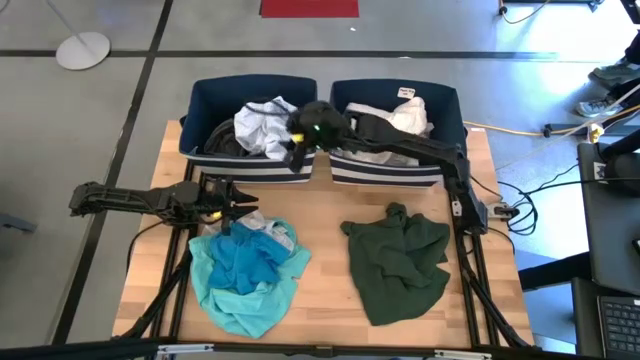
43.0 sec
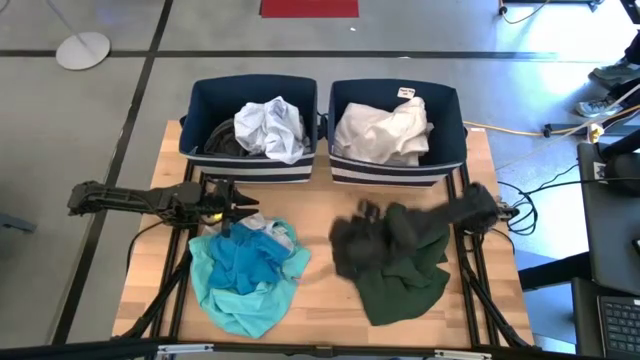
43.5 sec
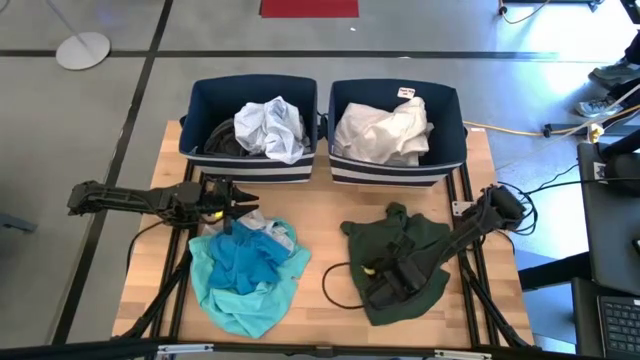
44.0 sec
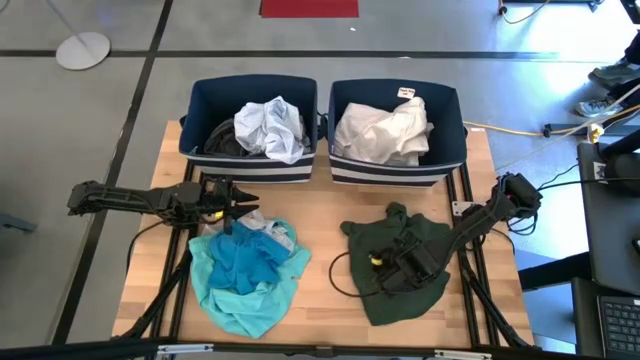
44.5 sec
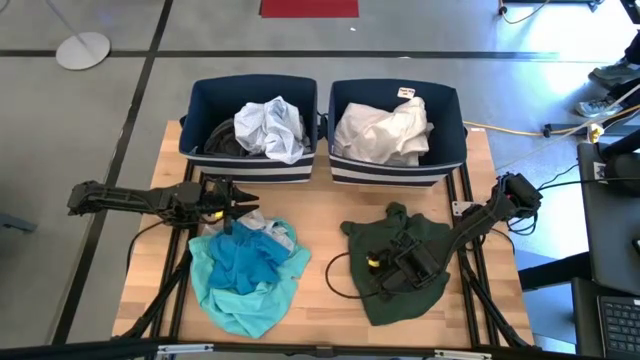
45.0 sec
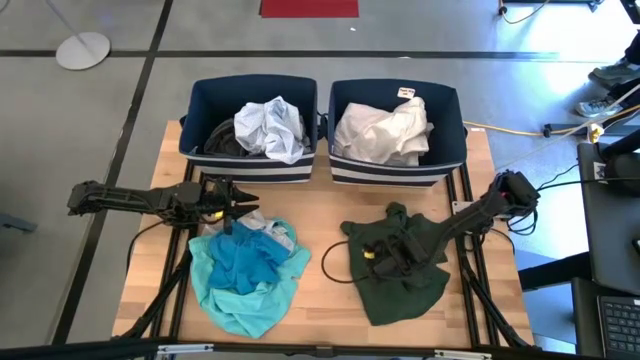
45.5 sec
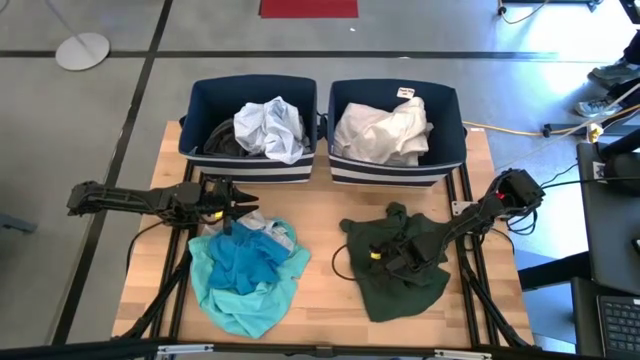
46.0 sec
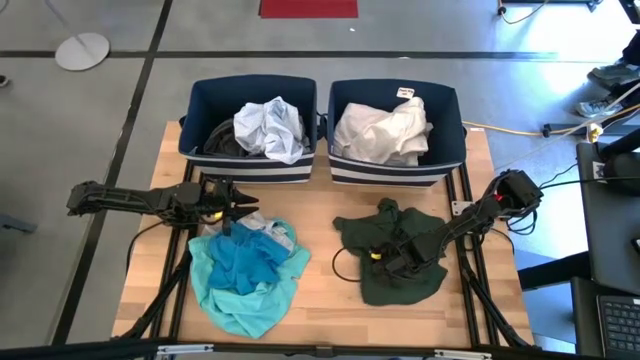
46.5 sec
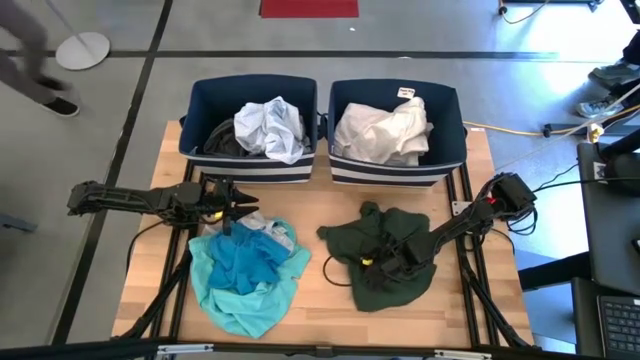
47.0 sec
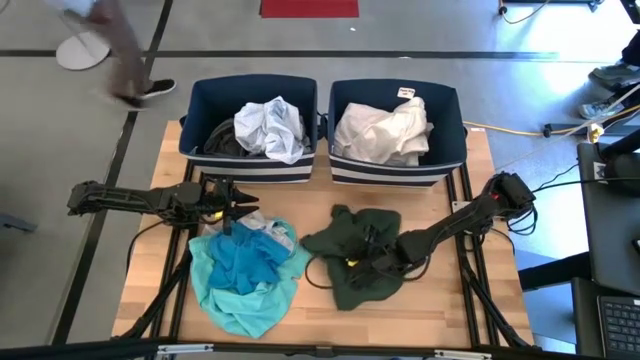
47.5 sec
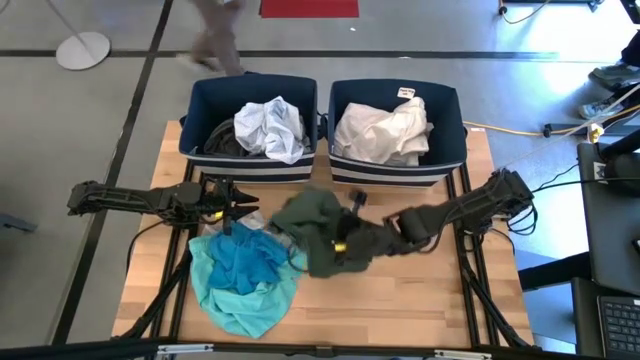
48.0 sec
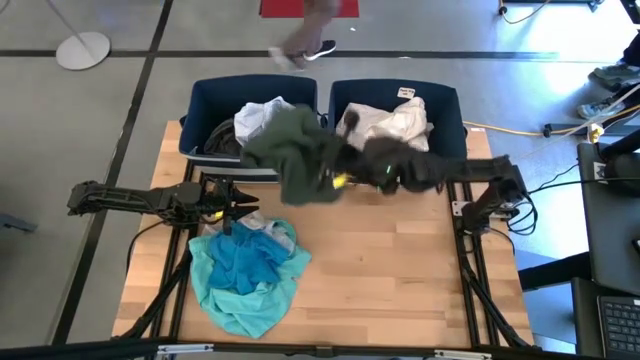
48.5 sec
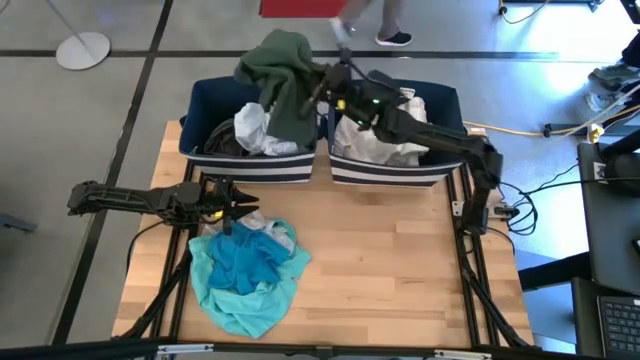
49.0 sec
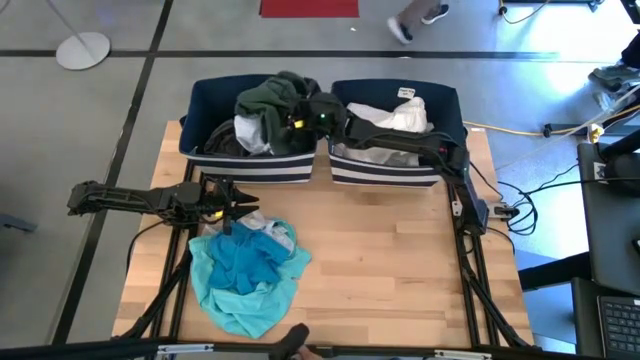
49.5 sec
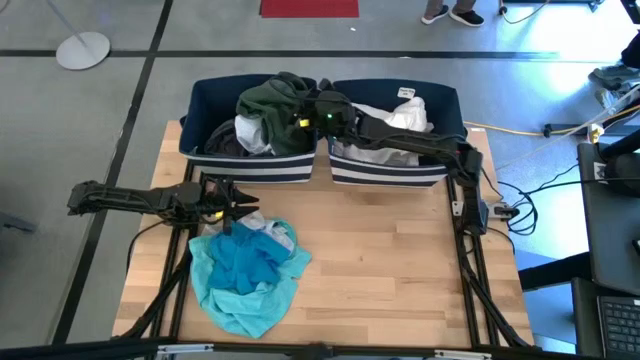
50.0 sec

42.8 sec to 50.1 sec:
Task: Sort clothes
Put the green shirt into the left blue laundry bin

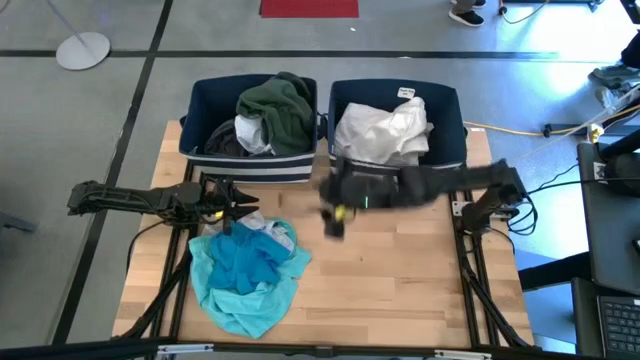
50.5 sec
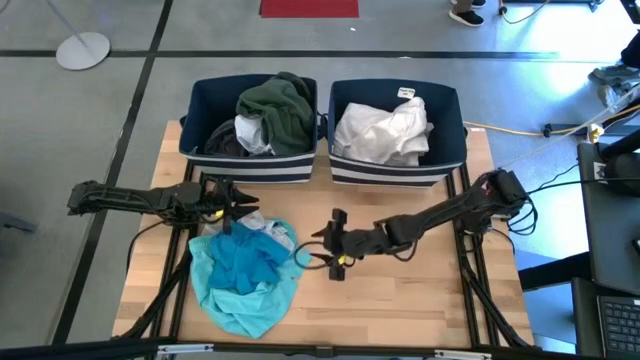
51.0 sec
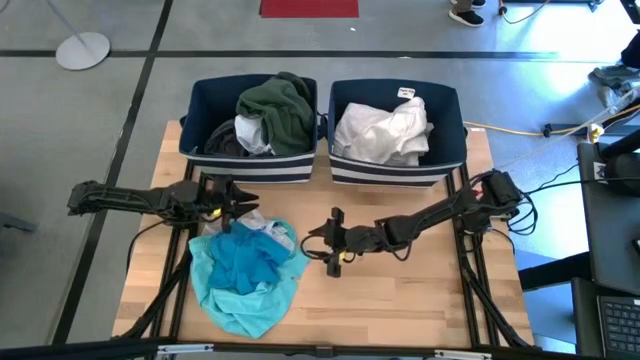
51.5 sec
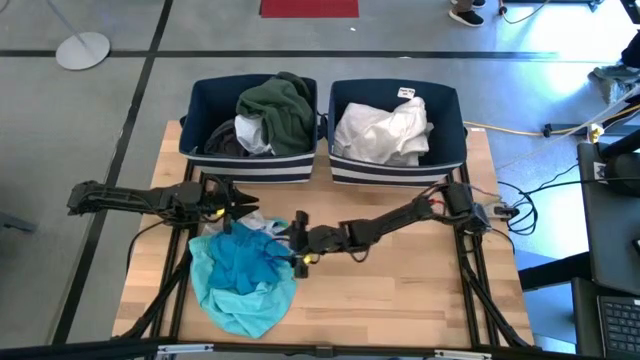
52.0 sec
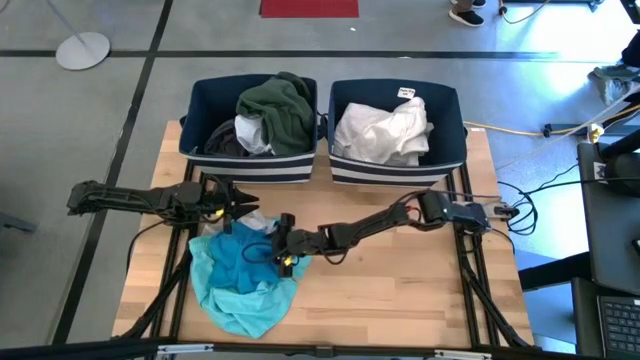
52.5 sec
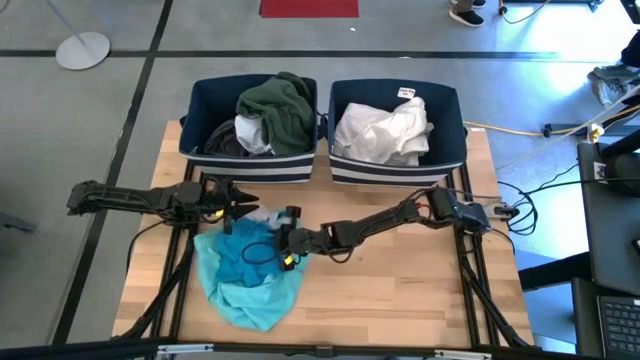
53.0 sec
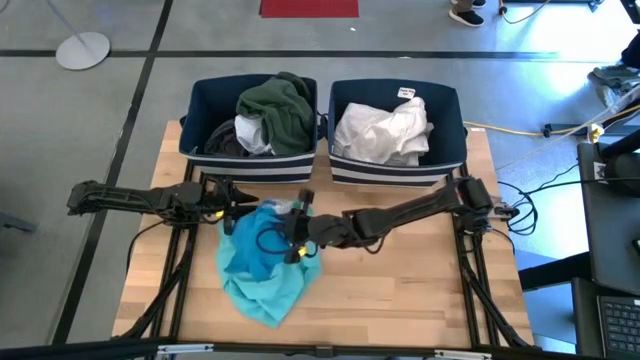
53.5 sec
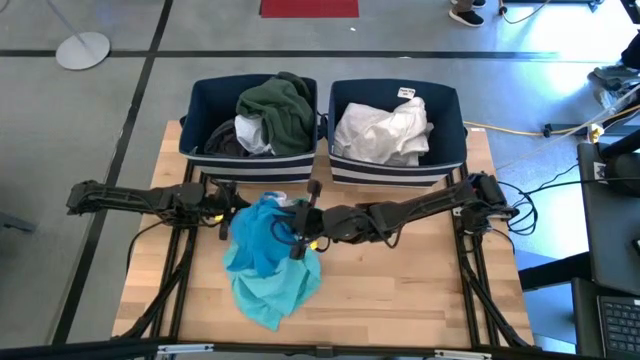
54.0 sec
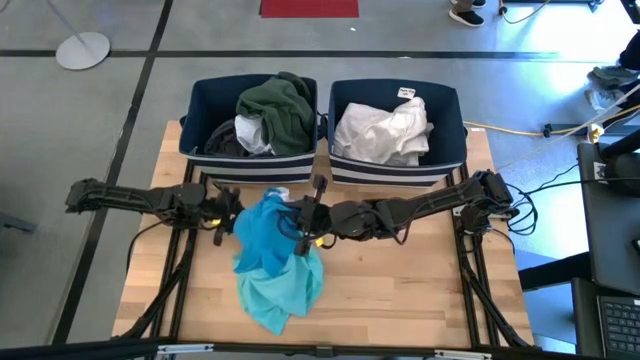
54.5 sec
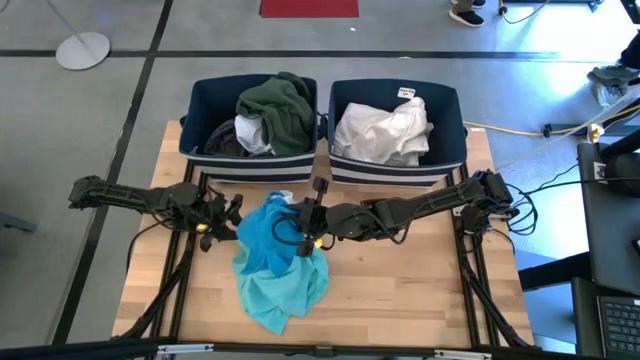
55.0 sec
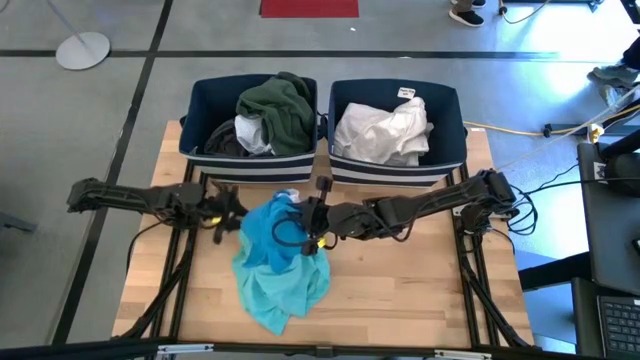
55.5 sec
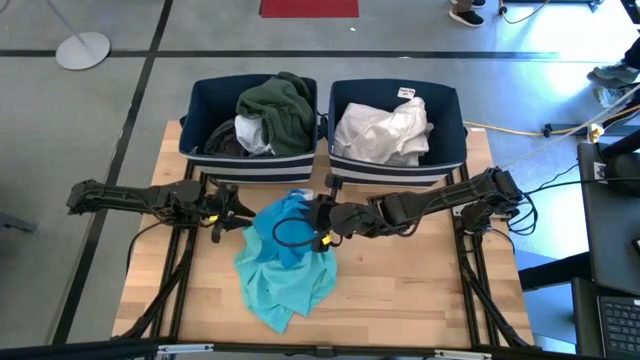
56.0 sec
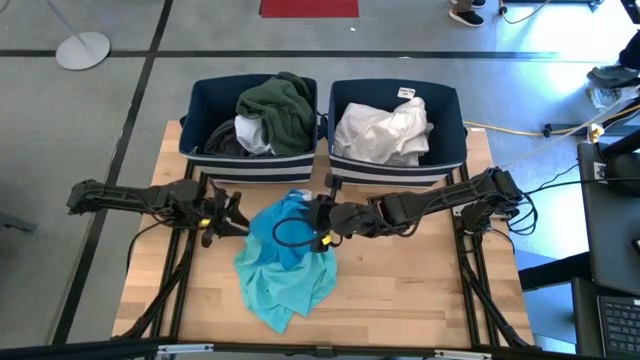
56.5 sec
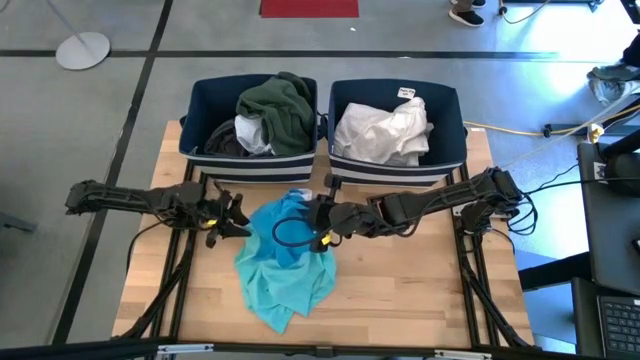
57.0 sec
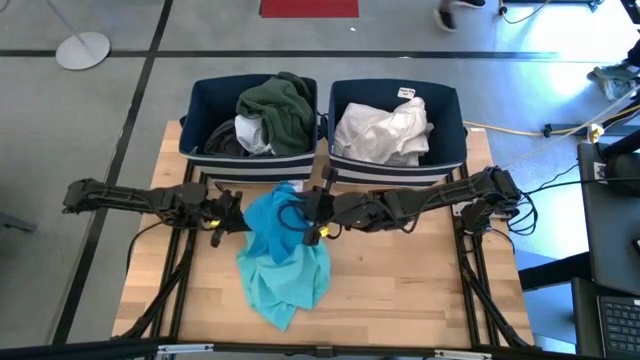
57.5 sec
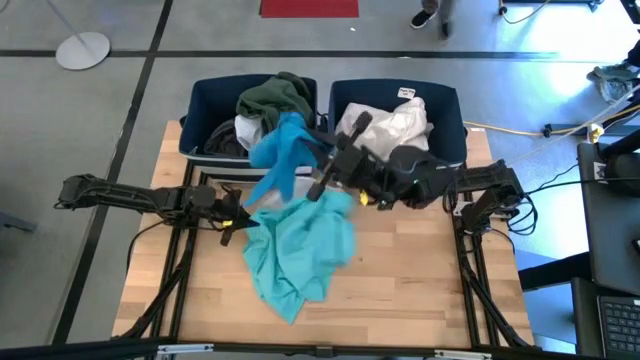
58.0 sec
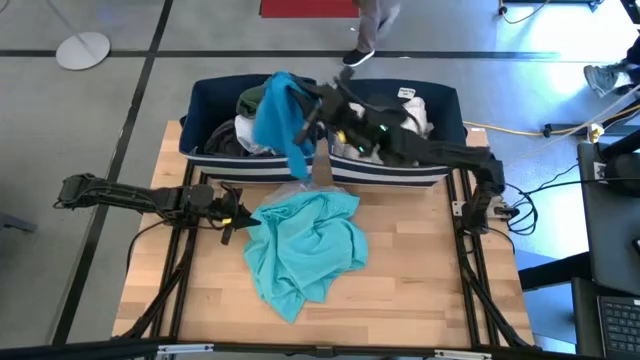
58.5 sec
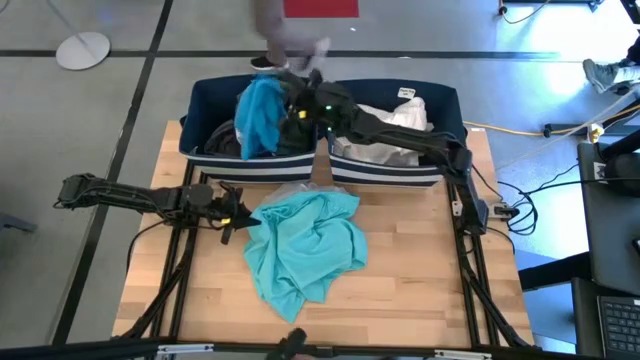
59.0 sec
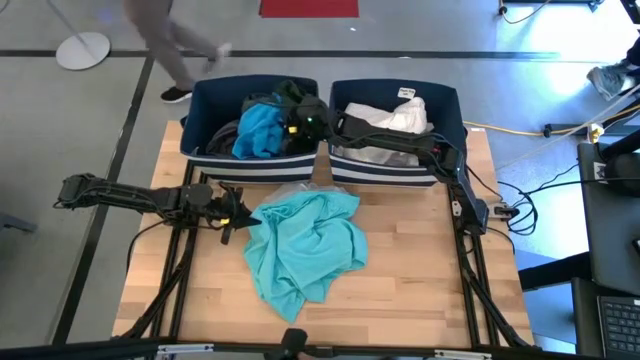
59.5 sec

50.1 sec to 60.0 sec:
Put the blue shorts into the left blue laundry bin

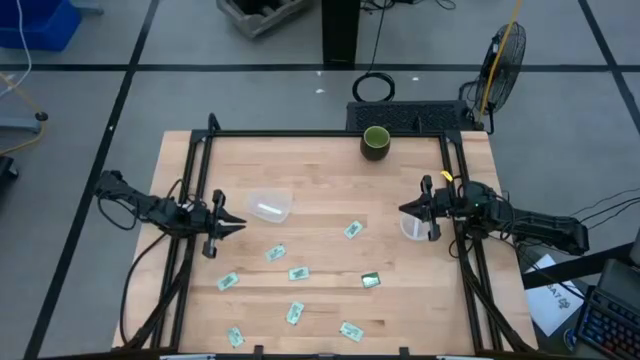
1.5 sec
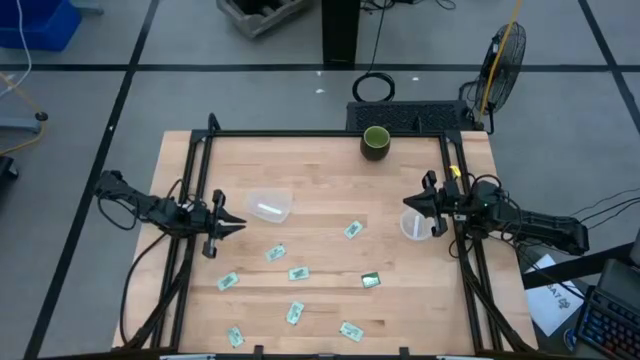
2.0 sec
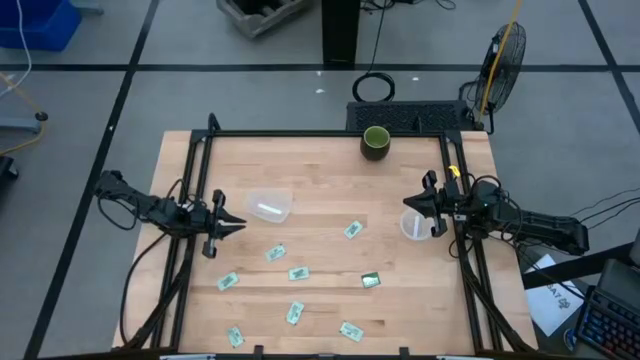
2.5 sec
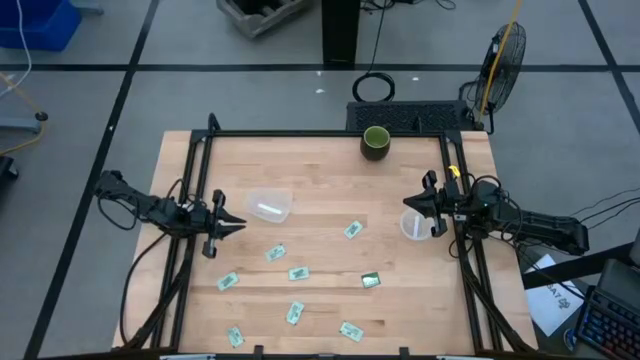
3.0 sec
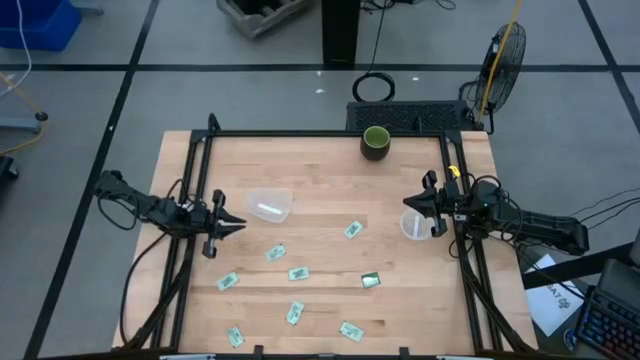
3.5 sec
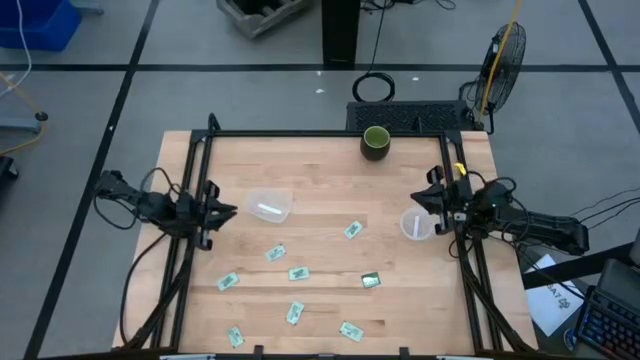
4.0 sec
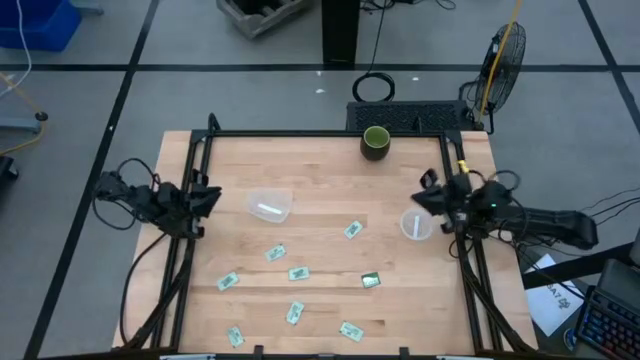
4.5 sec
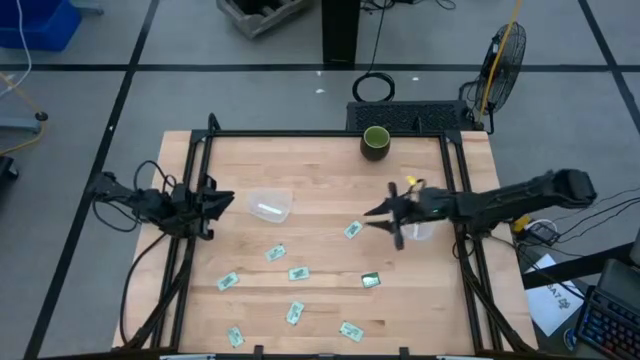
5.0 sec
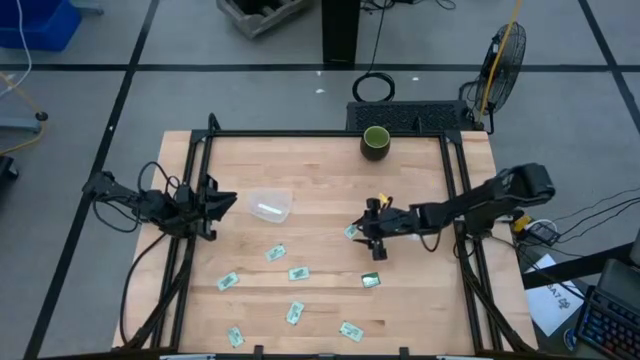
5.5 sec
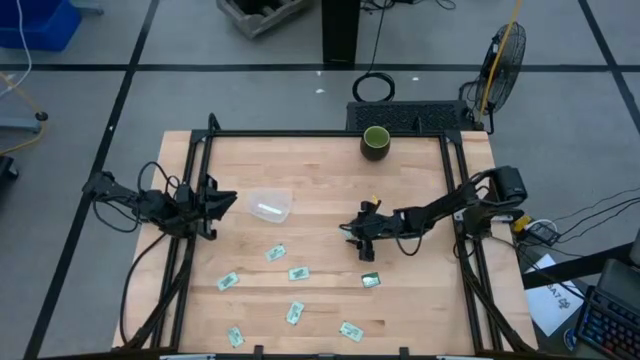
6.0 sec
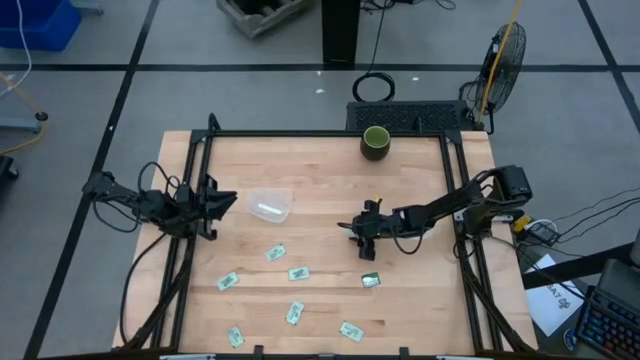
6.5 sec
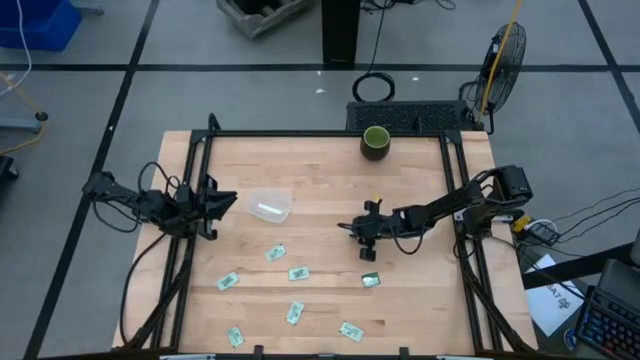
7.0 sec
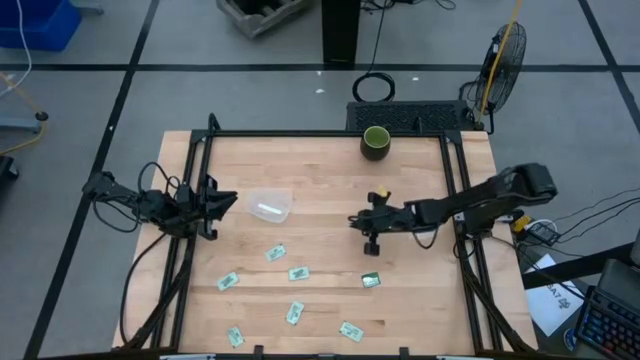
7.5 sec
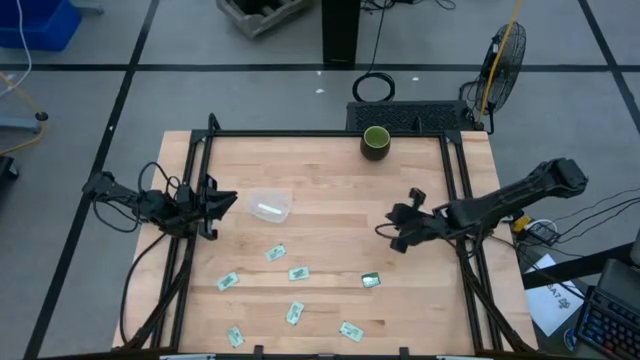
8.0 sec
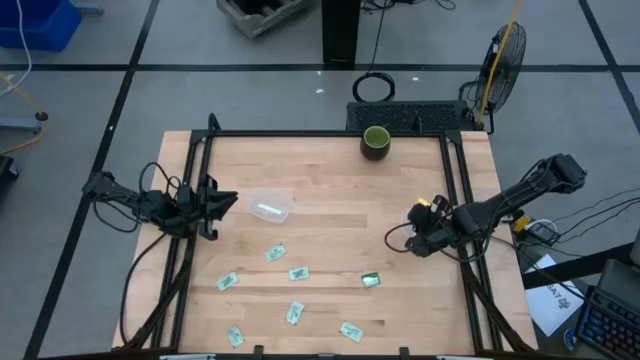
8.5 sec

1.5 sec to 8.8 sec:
Task: Pick and place Stevia / Truvia into bins
Put the white stevia packet into the transparent circular container
